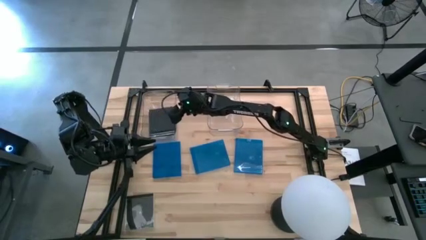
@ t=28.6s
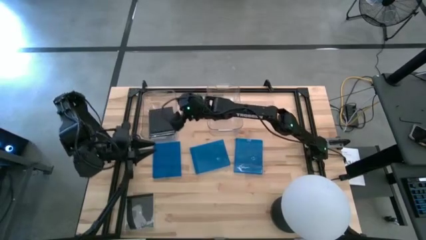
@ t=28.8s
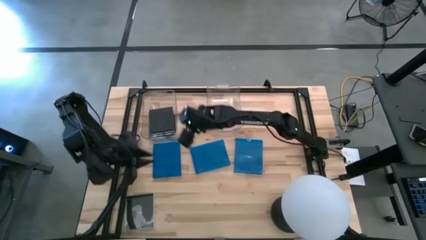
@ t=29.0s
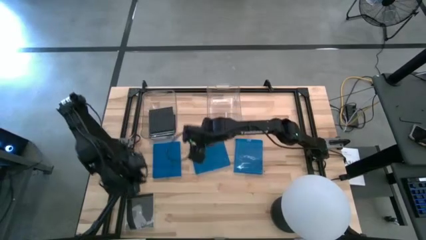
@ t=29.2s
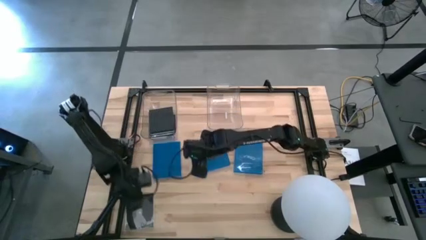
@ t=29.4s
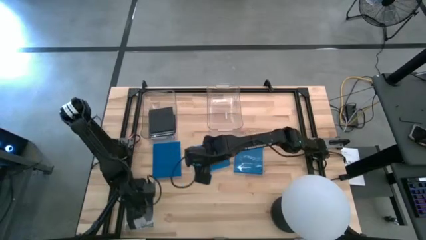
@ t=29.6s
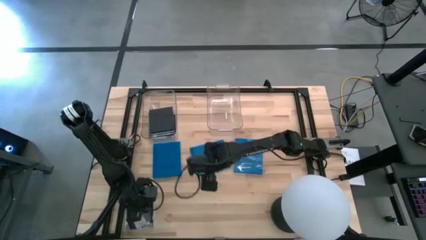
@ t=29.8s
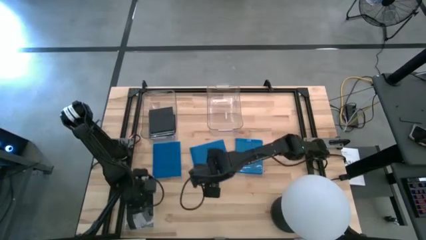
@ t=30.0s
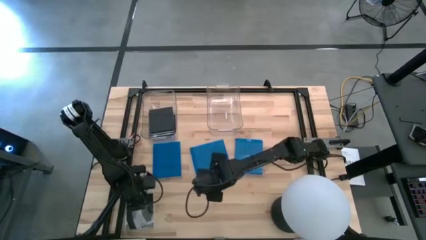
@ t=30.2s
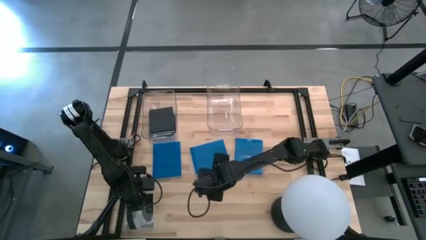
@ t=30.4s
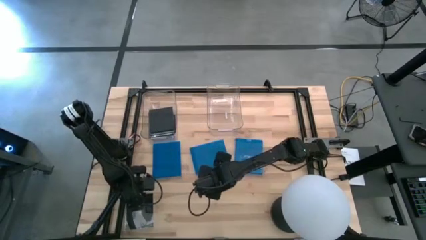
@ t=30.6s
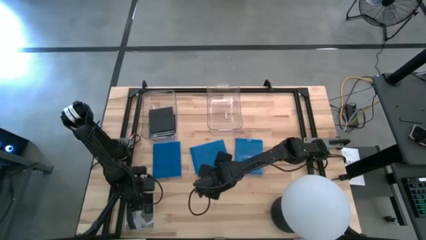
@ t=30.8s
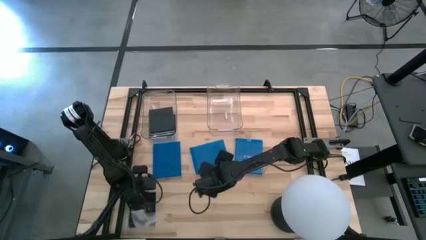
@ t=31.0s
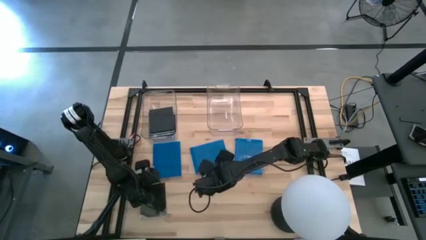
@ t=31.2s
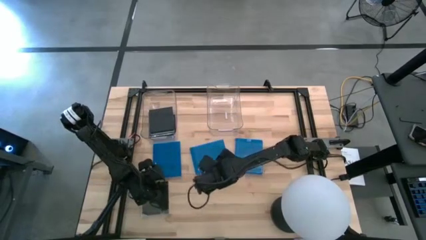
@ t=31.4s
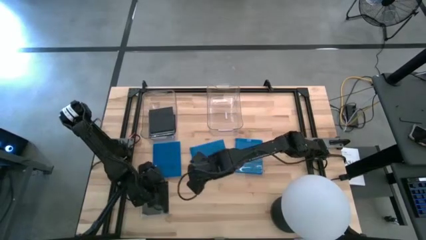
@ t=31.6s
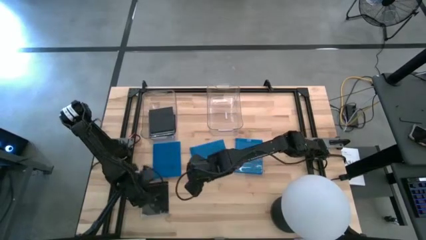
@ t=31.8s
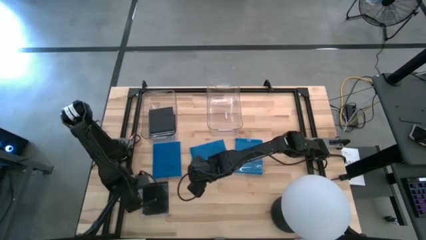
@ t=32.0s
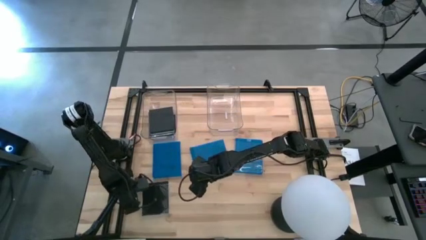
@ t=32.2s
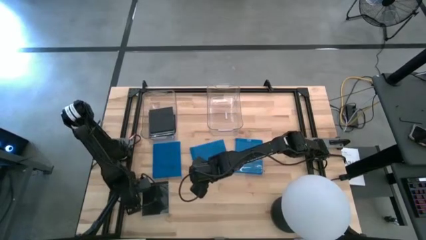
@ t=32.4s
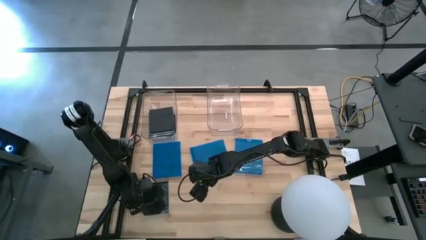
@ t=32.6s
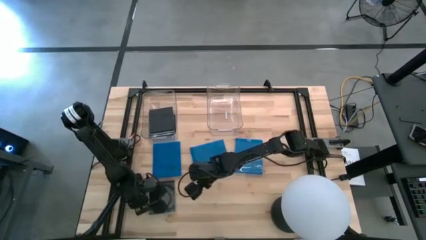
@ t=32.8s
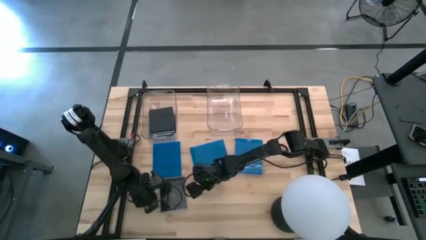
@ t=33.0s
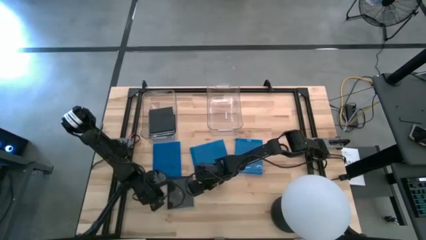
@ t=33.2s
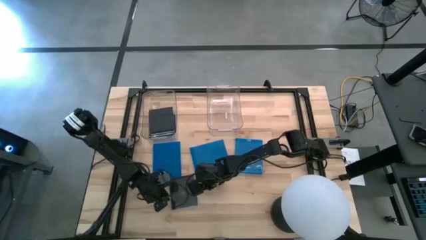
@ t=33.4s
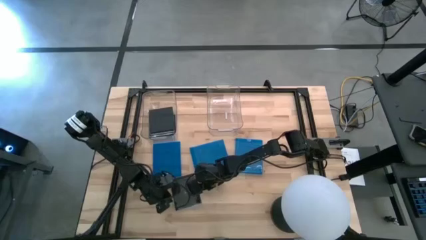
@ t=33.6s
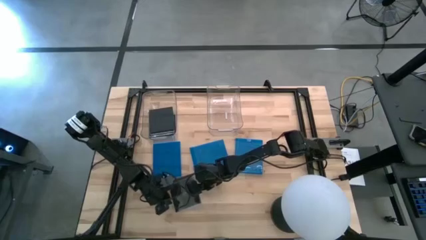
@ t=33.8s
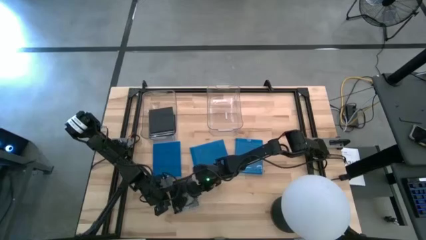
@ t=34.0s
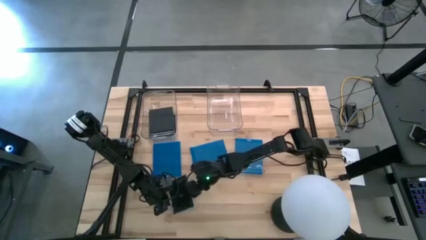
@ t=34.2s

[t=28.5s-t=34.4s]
Task: Pick & place jewel cases by type
Put the black CD case into the left transparent bin

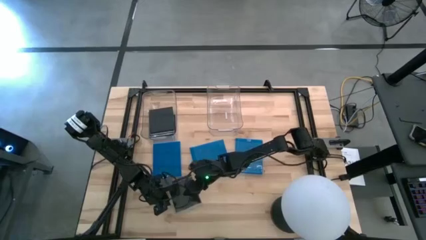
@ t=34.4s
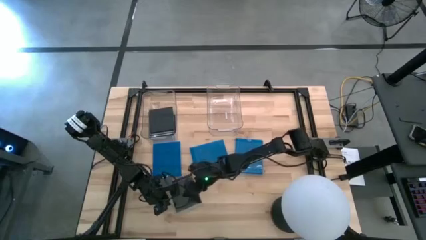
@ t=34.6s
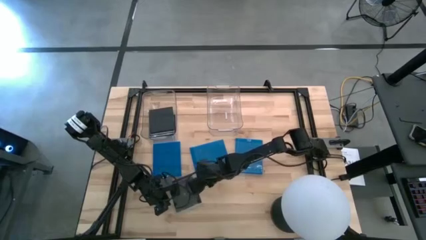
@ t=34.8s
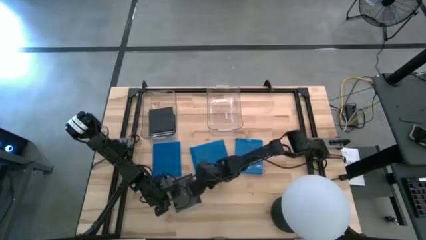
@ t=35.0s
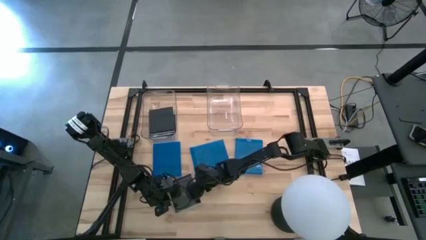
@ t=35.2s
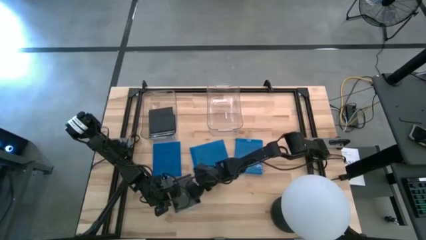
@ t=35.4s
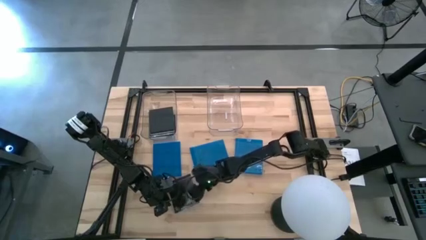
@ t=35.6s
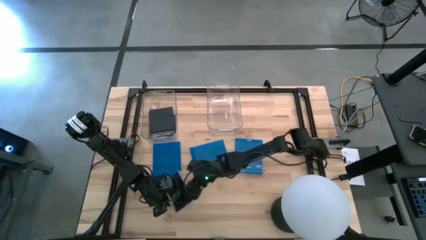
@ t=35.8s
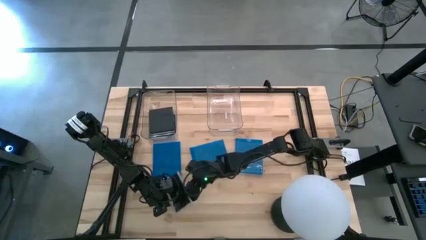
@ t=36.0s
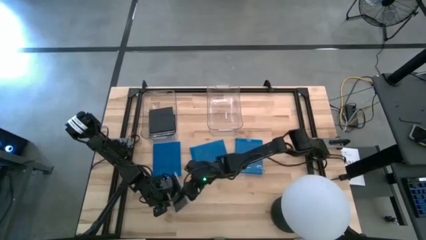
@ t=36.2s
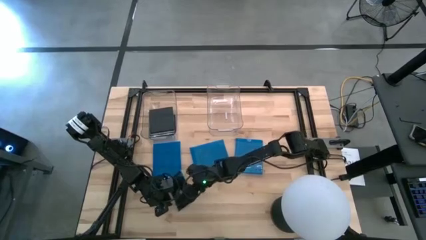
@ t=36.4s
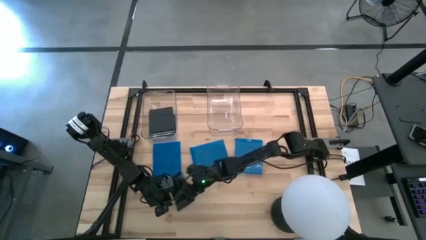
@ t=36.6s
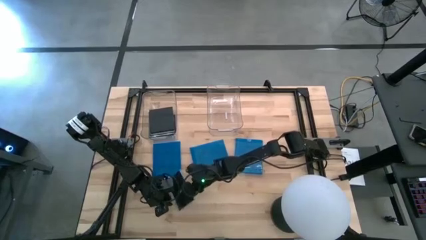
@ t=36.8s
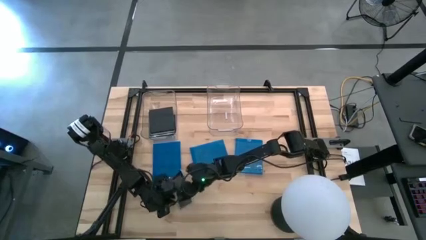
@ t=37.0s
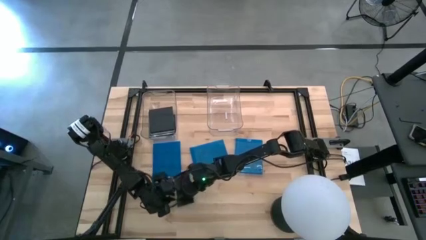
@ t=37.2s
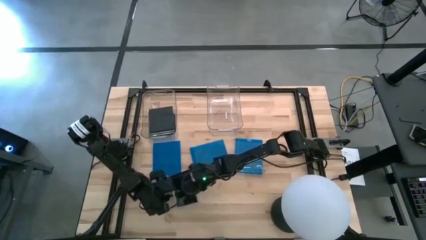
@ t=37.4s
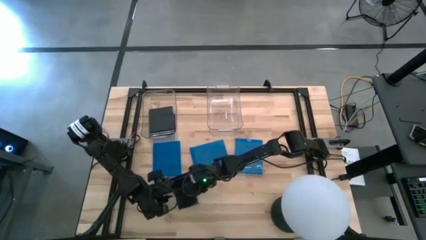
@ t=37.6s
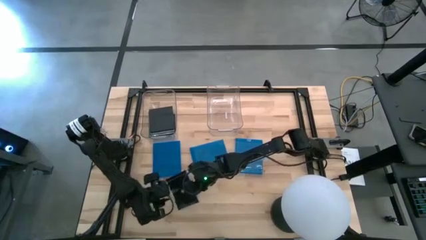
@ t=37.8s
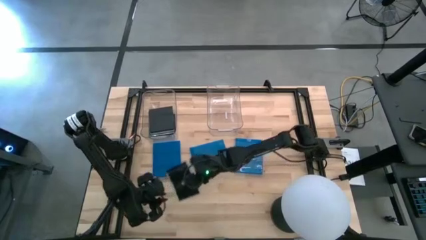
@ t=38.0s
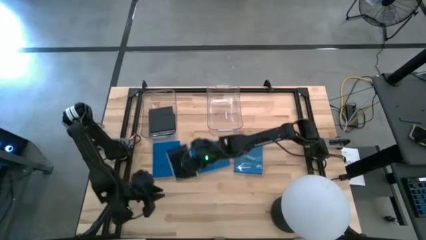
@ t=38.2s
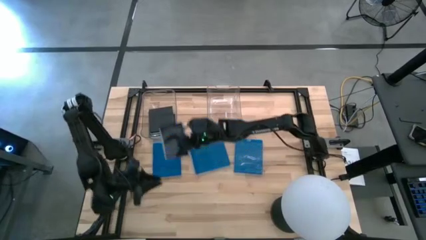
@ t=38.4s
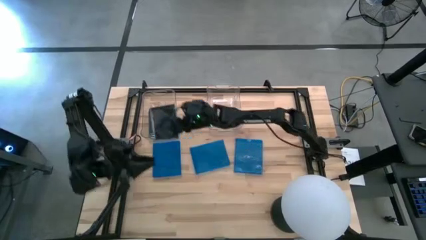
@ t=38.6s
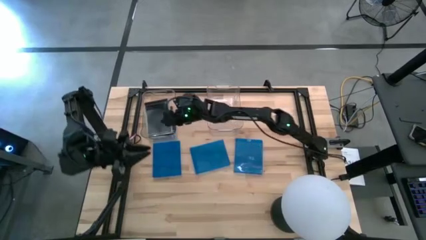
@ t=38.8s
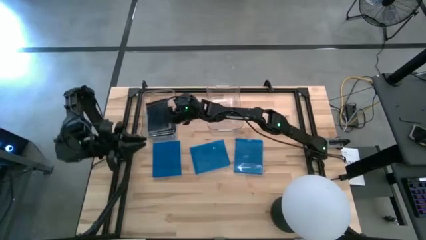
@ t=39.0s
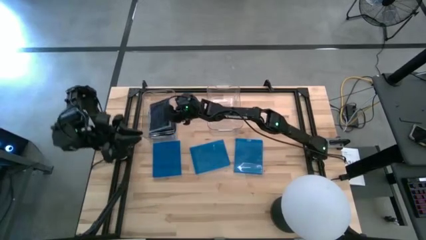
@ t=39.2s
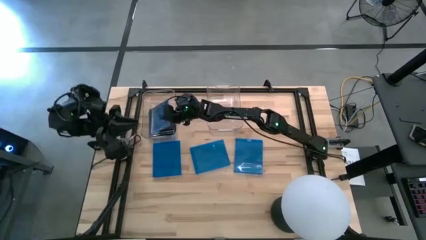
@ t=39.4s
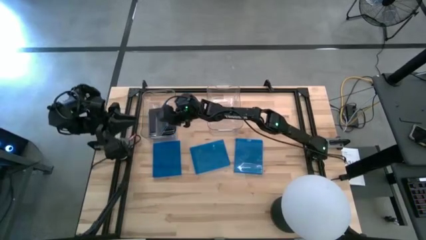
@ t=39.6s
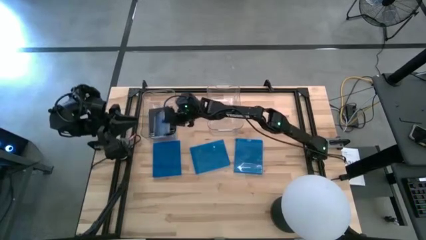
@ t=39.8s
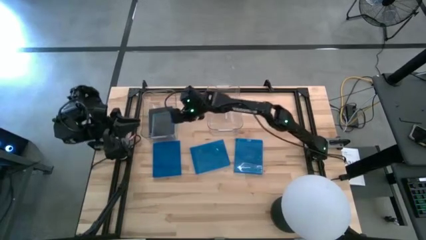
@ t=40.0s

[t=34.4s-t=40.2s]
Put the black CD case into the left transparent bin

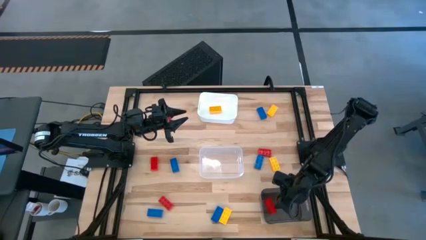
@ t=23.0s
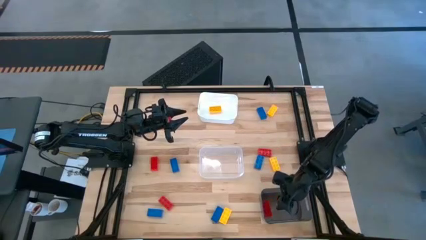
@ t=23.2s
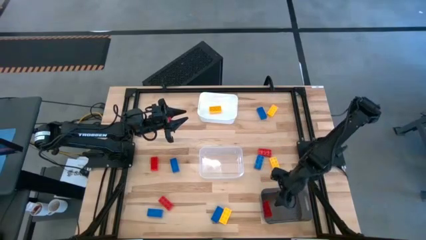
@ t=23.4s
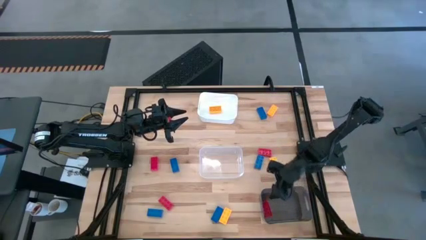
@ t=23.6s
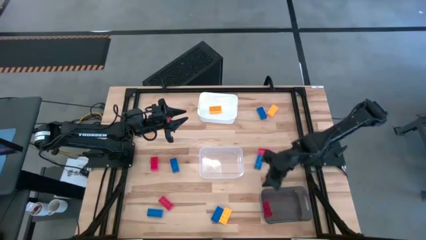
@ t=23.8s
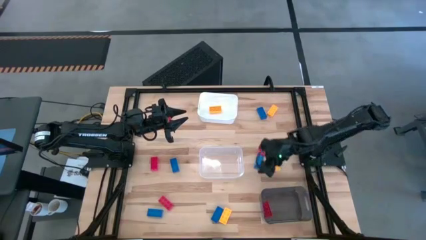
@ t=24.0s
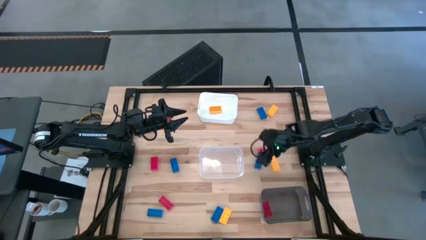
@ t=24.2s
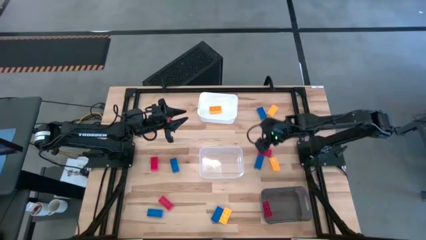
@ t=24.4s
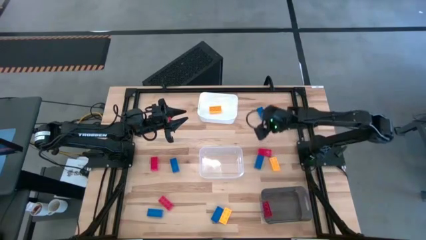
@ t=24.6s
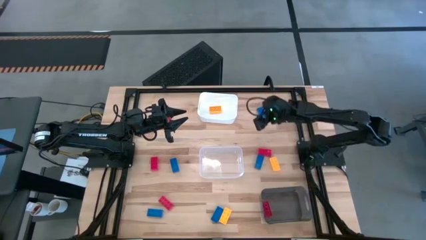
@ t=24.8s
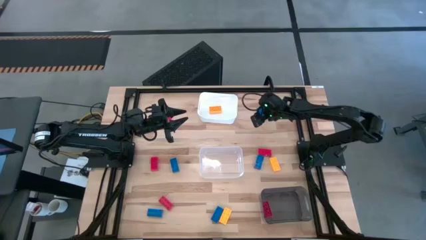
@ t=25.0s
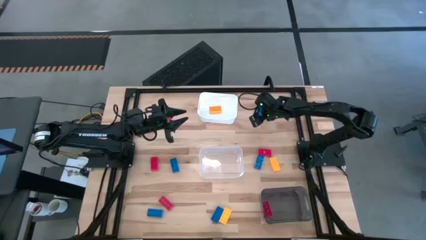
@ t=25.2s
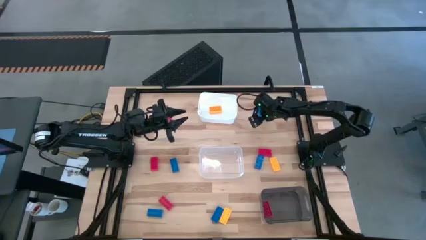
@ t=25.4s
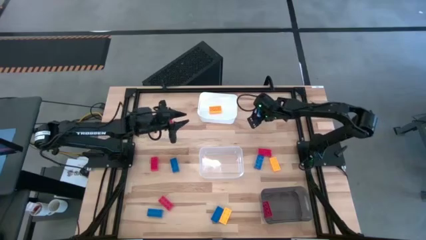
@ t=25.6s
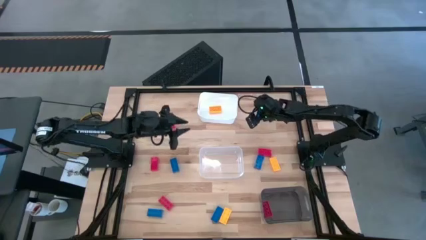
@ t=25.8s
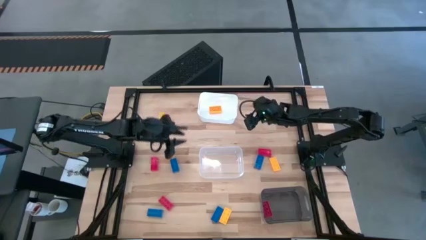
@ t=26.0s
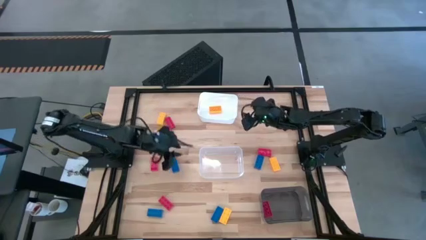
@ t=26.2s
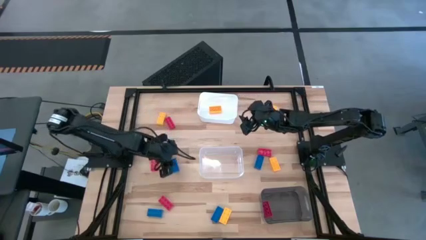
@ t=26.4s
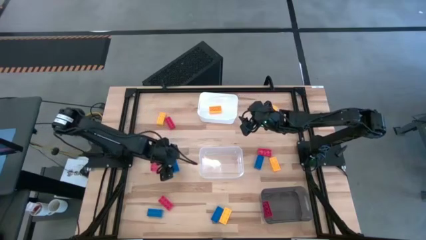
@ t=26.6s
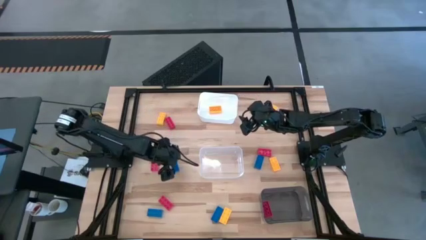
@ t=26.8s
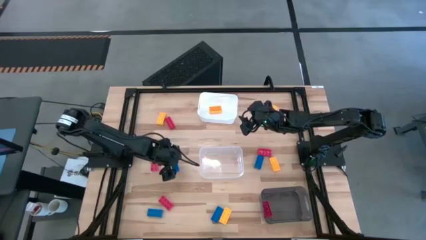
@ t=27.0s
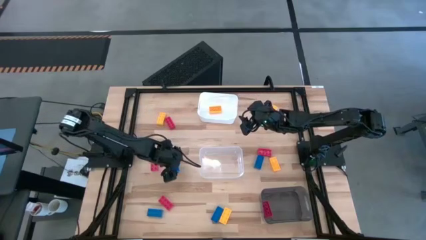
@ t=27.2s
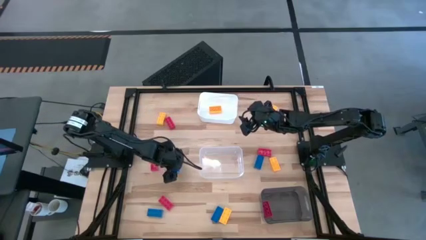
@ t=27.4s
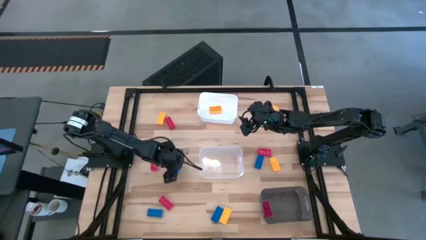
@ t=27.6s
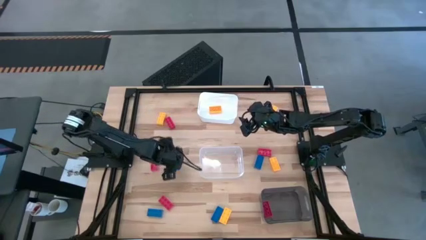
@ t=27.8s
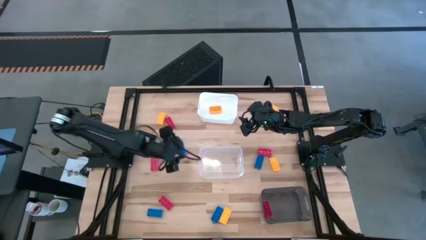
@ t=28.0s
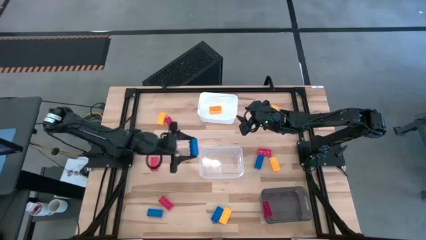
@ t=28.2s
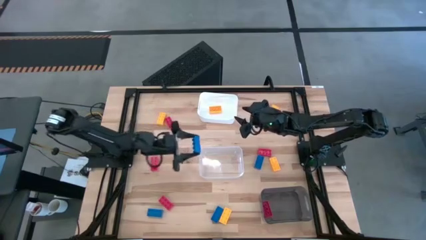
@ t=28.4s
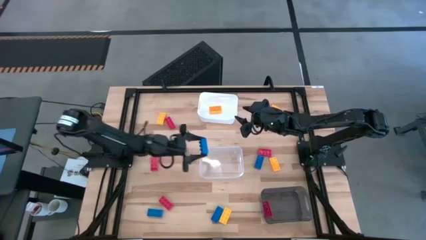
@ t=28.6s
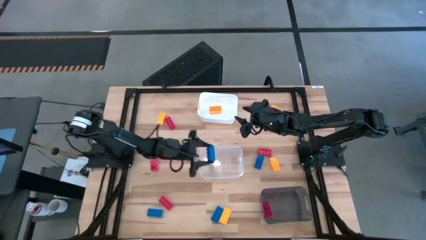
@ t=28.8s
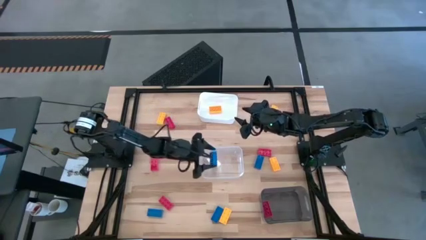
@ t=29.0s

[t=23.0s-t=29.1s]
Task: Sort & place blocks by color
Put the blue game piece into the transparent bin
